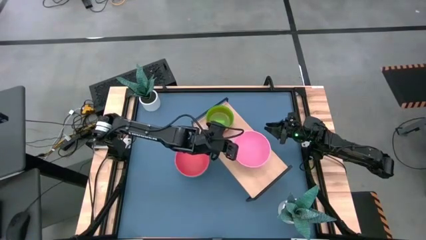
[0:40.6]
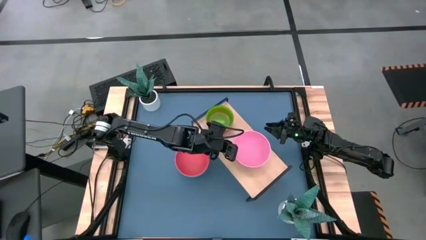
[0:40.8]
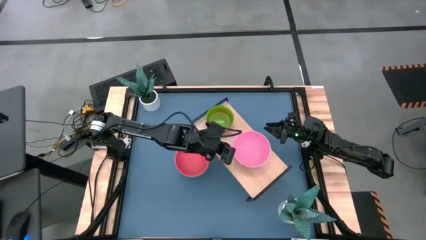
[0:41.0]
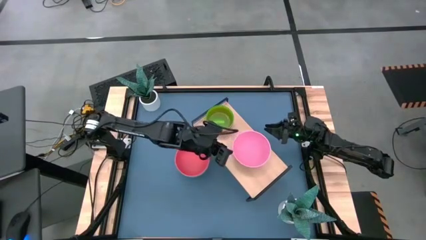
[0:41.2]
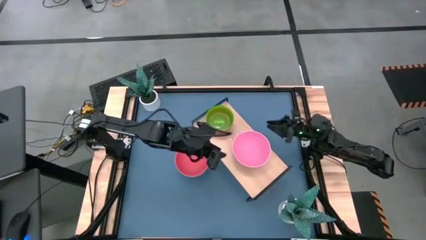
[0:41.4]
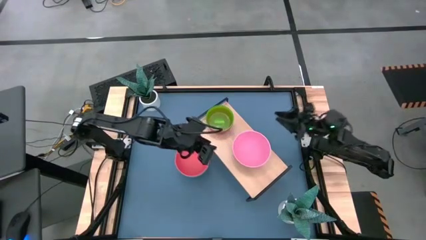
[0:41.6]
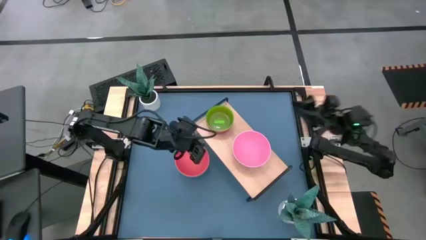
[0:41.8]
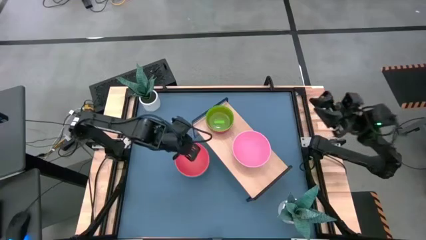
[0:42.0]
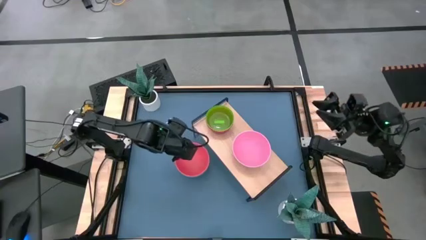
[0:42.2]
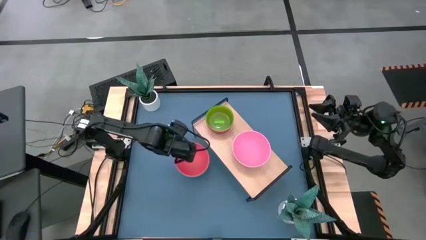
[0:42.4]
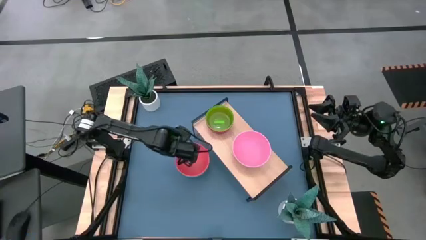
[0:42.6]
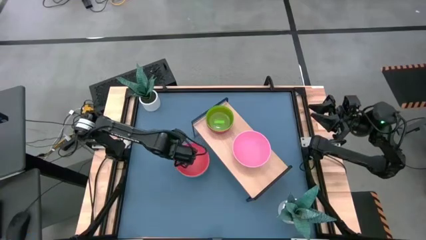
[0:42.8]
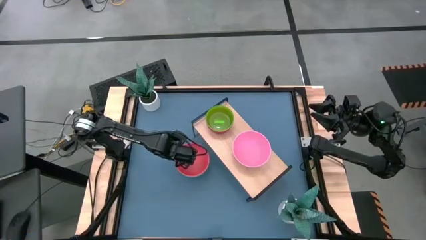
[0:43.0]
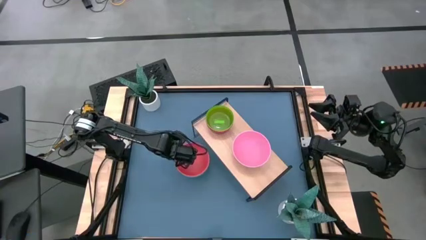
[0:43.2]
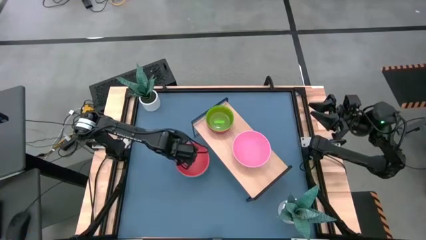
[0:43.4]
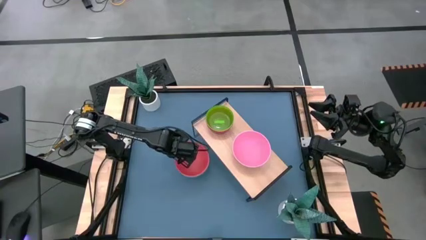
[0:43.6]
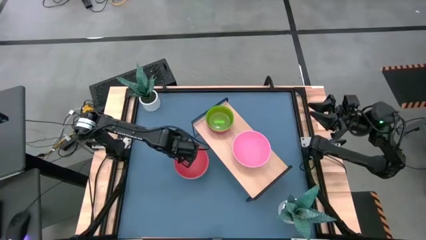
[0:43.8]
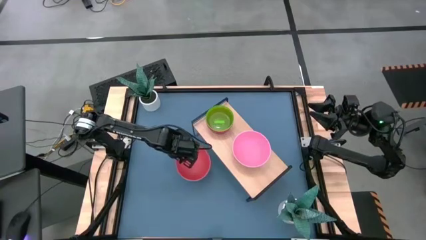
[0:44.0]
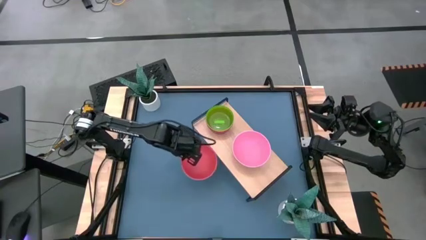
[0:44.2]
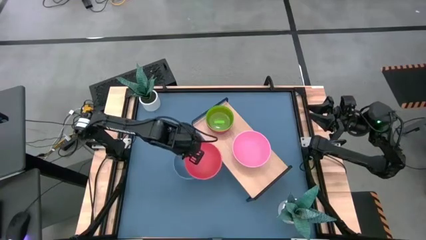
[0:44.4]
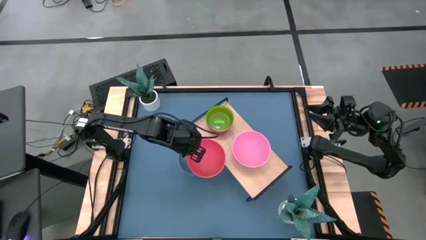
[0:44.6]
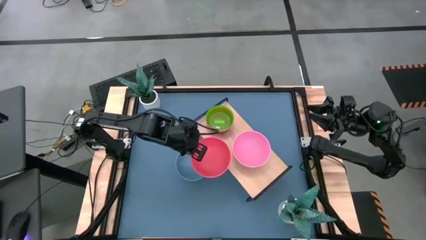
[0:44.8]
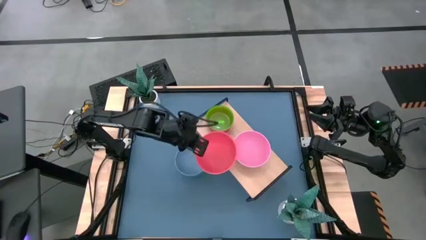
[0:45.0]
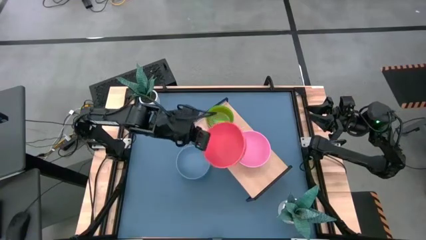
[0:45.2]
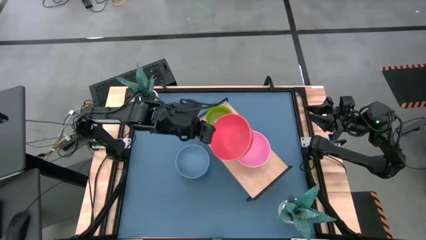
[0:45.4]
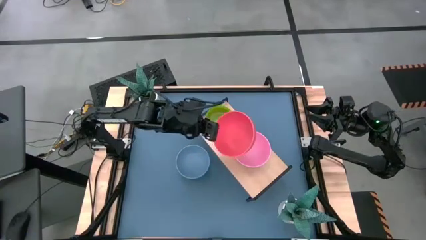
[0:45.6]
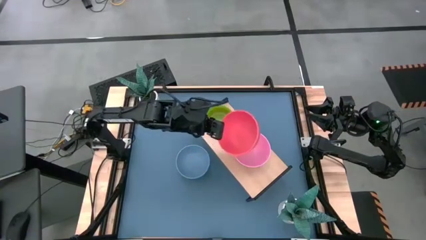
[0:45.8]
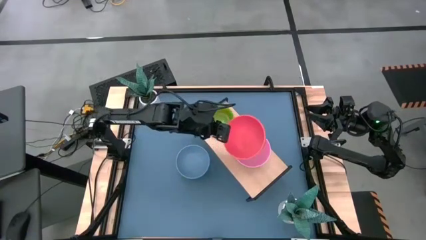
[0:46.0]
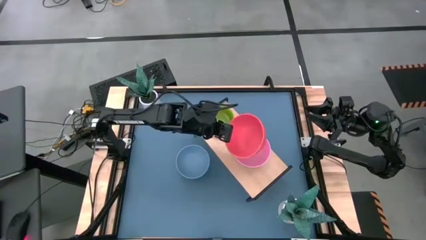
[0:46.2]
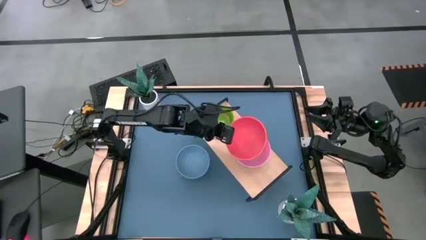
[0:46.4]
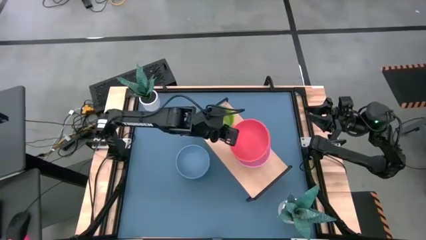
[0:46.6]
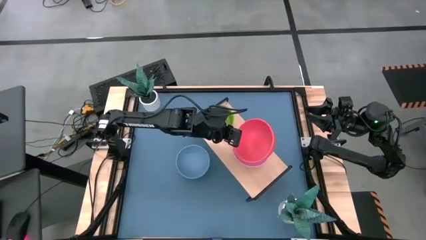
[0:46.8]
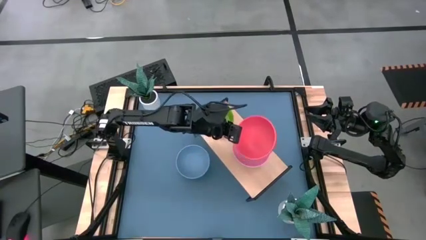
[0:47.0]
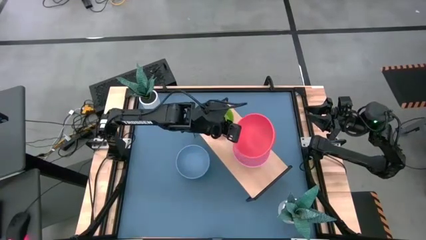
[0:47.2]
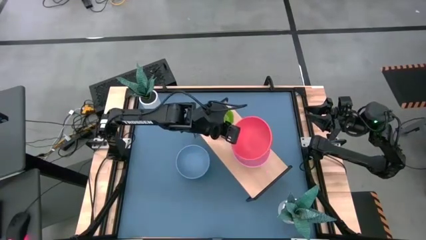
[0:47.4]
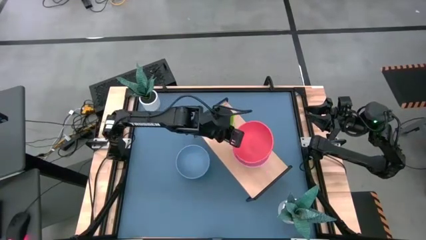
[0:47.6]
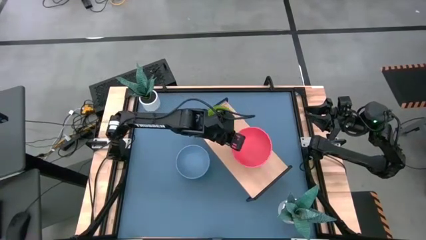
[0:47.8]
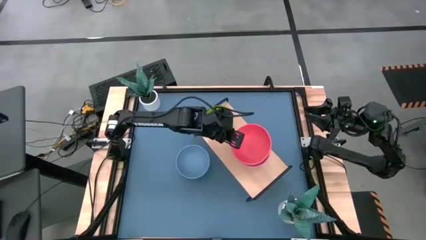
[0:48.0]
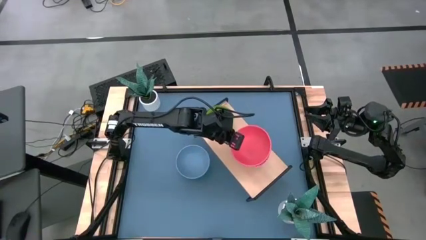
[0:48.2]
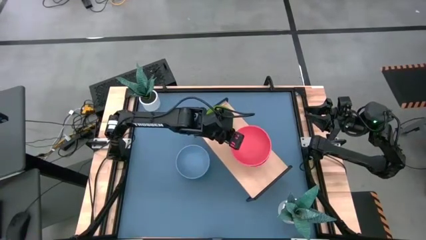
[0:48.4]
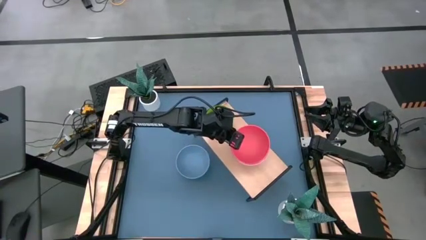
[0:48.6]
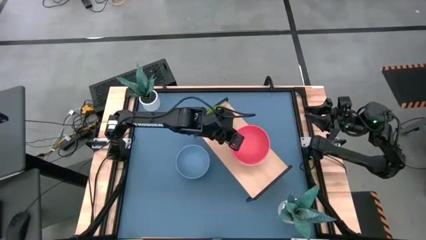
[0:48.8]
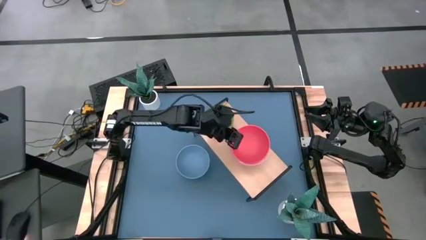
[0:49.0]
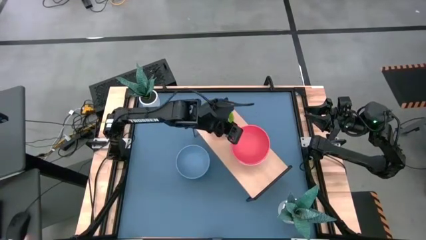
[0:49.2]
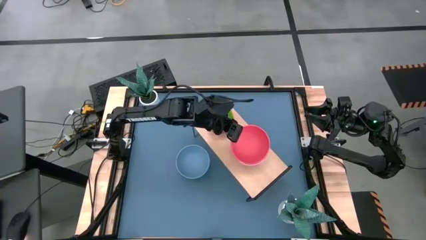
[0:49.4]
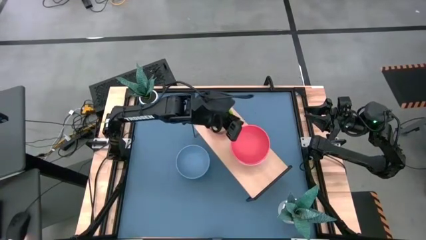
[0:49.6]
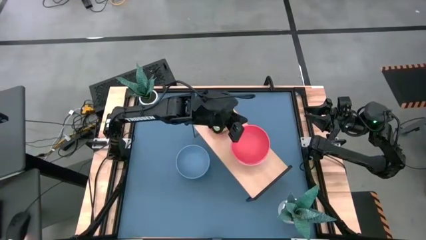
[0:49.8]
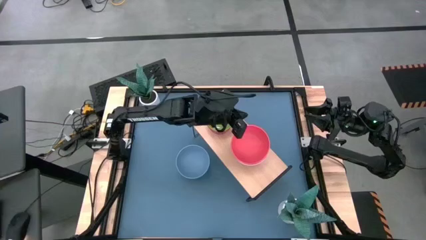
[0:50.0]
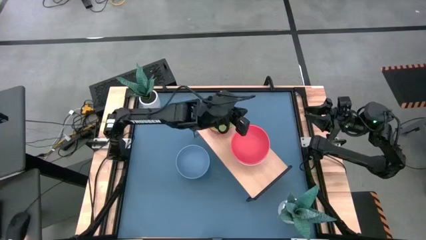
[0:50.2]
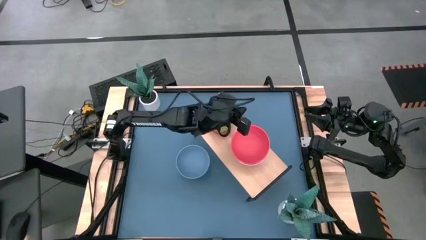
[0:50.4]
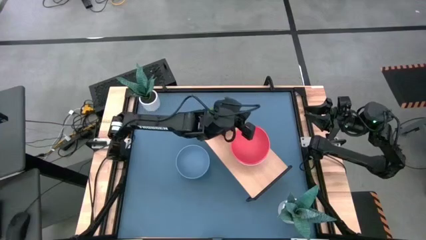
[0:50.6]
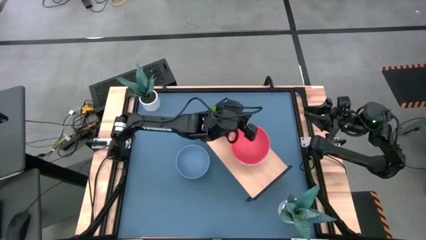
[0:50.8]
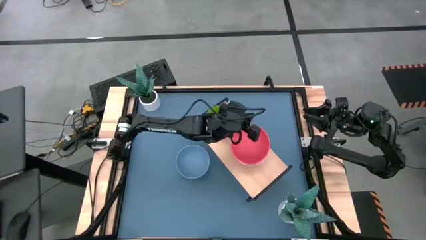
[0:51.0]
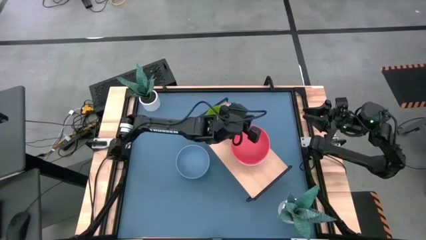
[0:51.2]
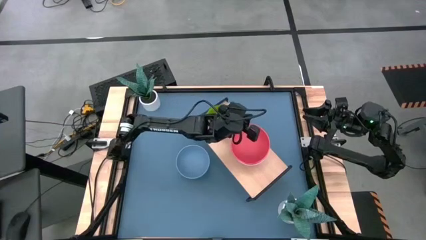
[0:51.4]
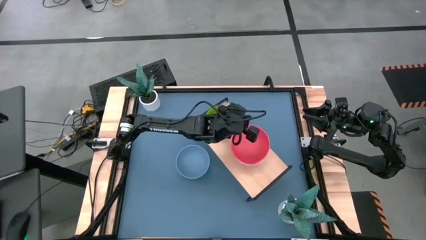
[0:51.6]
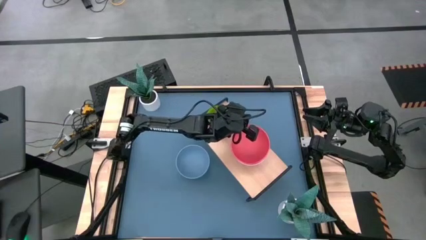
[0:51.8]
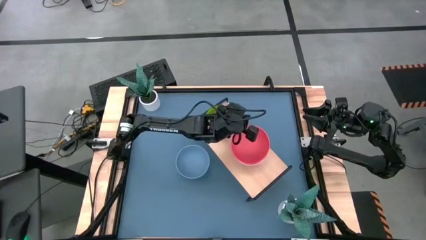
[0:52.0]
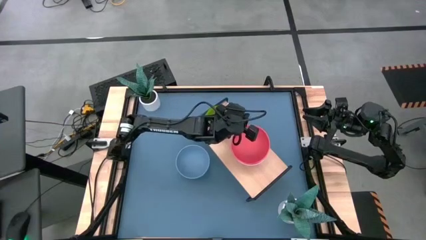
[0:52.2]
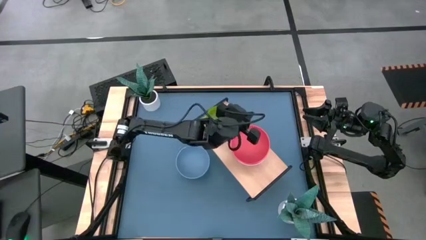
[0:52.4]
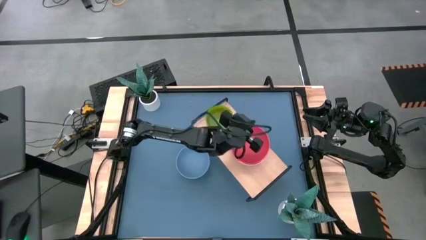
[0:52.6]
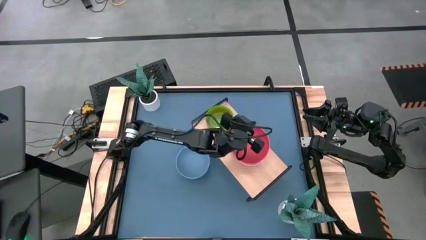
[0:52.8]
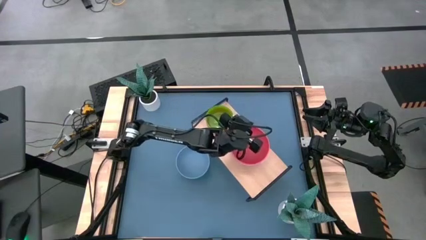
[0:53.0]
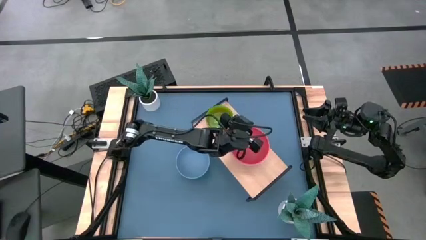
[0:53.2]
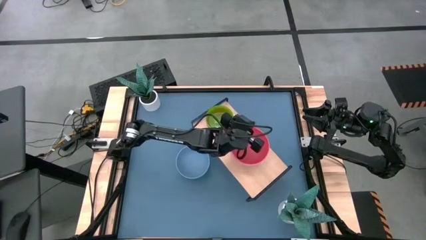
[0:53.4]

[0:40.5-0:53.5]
Task: Place and stack bowls onto a shelf
Stack the orange bowl on top of the pink bowl on the shelf

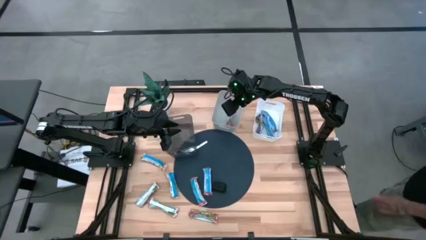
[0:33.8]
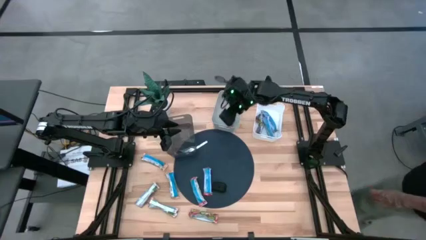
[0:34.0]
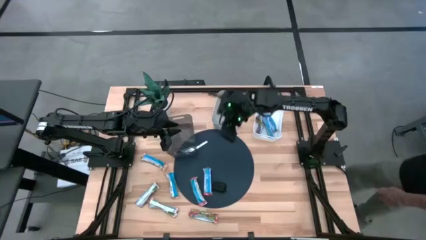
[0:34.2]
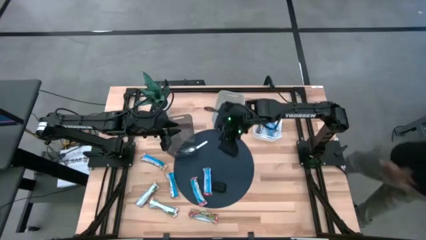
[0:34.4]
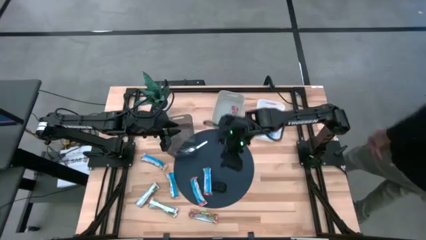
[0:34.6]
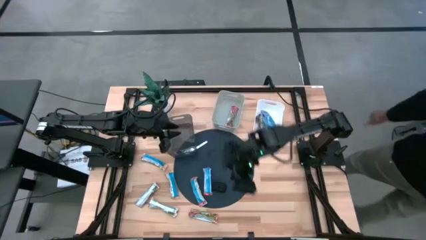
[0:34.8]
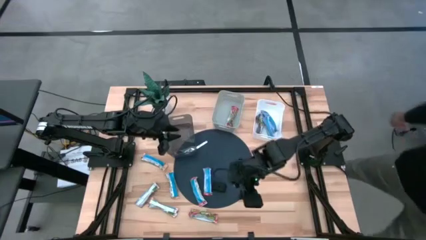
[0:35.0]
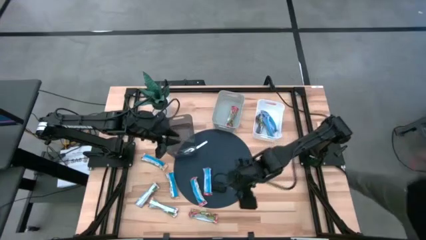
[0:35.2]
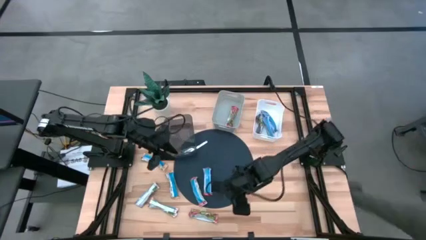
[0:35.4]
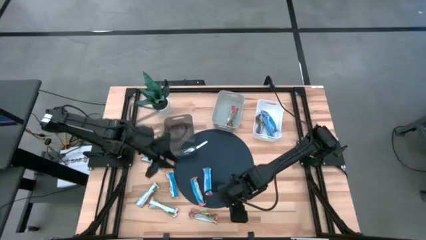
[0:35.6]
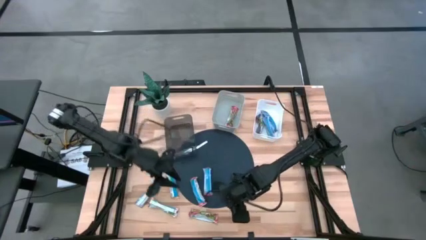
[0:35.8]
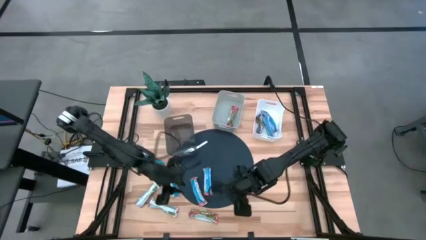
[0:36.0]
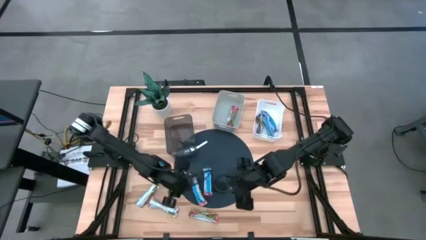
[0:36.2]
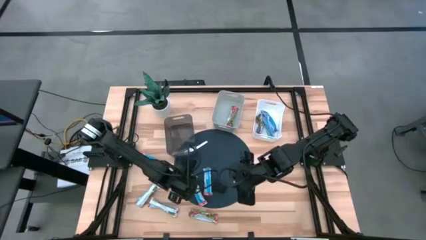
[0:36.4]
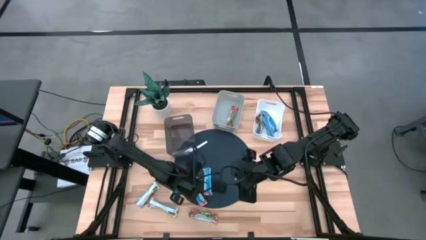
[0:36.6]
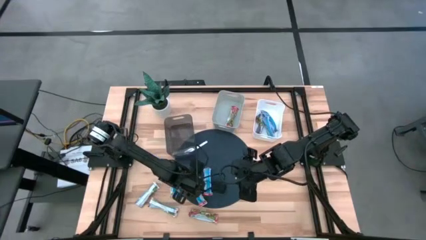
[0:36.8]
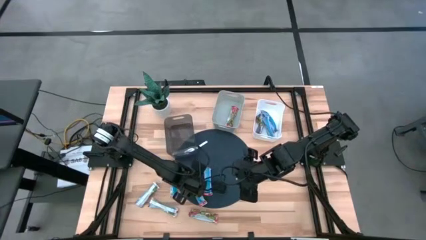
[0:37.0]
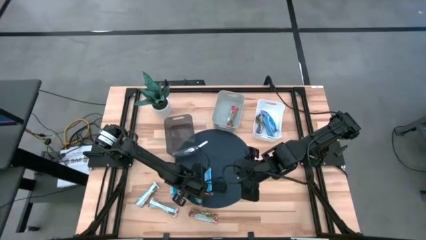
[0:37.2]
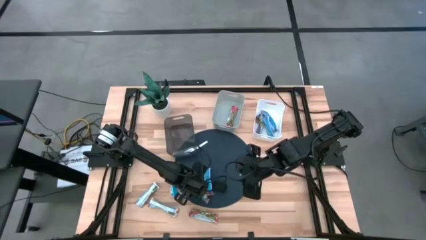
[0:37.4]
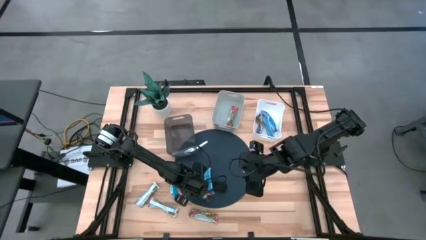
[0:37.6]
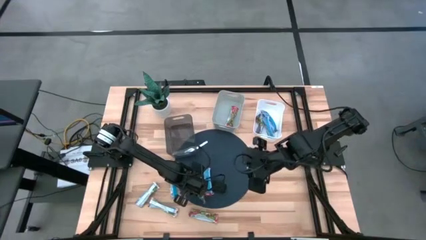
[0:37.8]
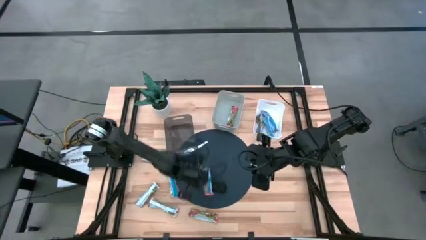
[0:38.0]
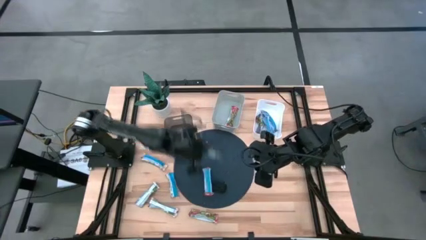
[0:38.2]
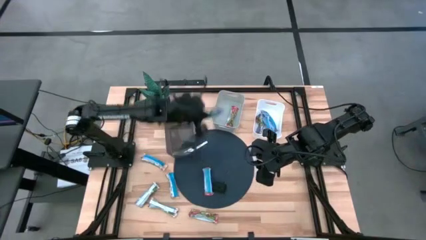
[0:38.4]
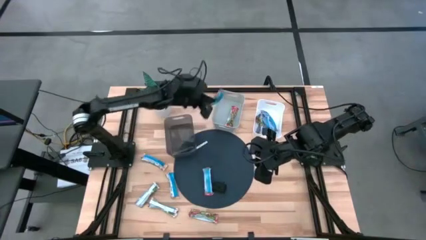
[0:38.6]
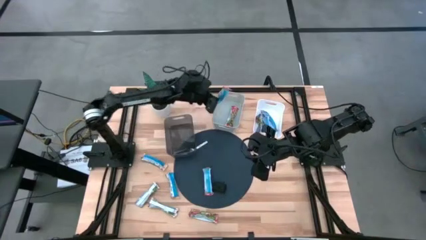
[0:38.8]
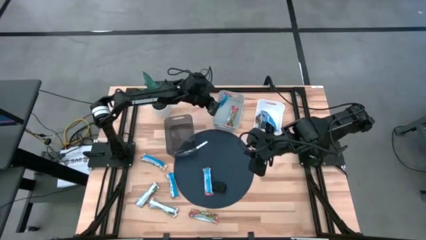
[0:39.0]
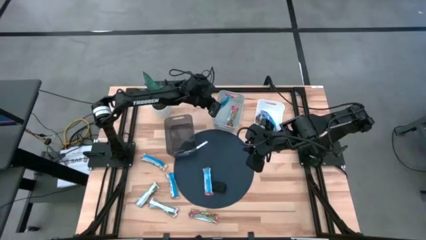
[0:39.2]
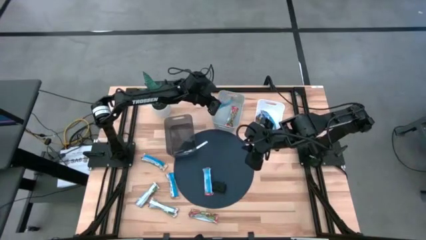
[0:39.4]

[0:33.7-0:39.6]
Task: Pick and place Granola Bars by type
Put the middle red granola bar into the gray bin
